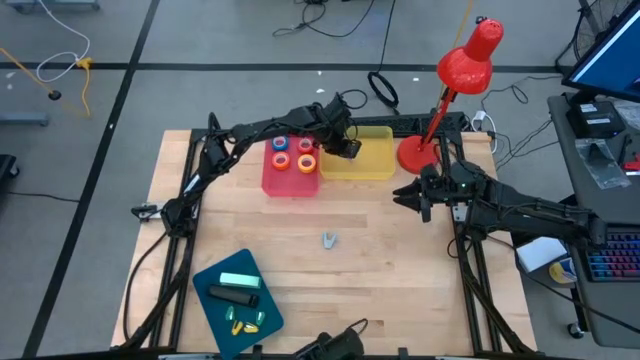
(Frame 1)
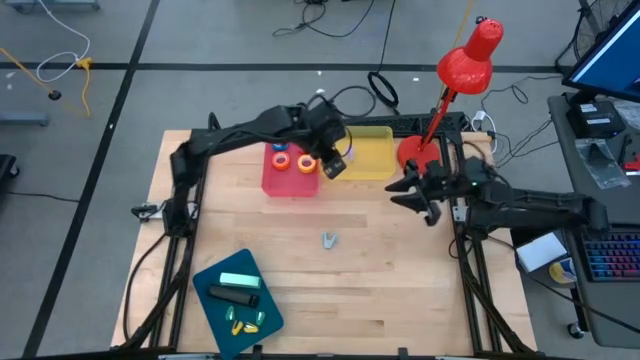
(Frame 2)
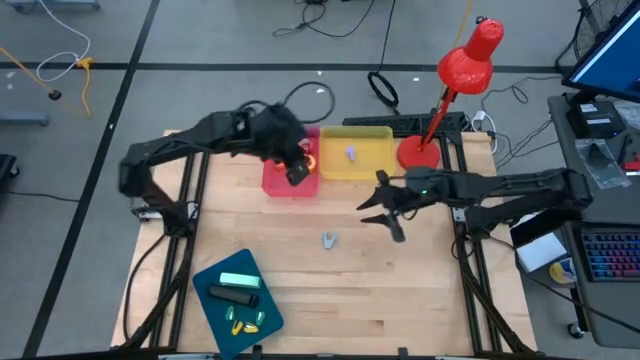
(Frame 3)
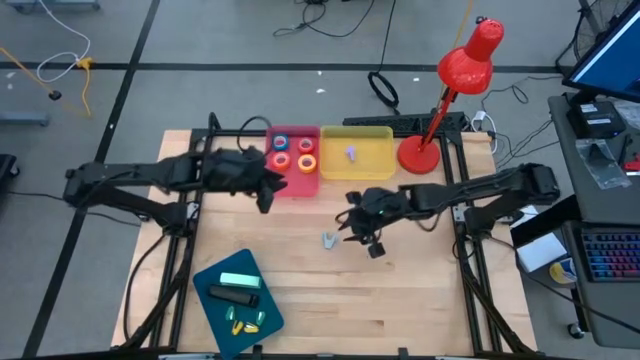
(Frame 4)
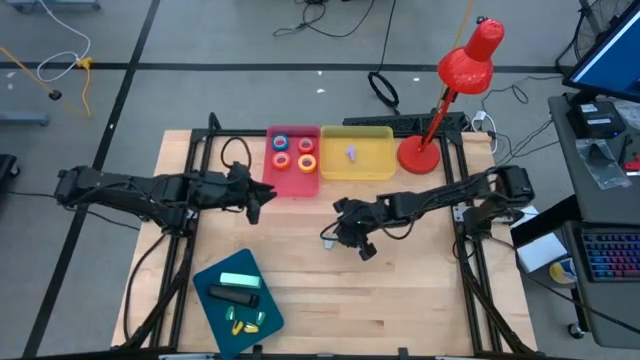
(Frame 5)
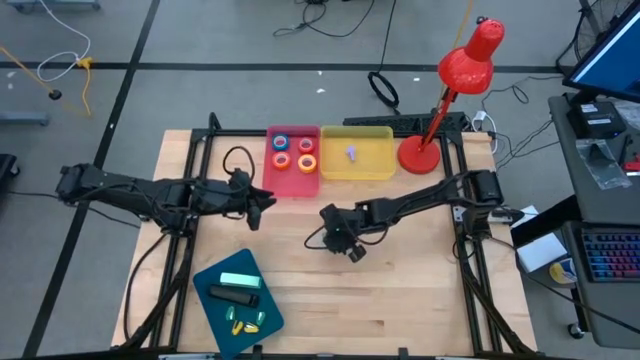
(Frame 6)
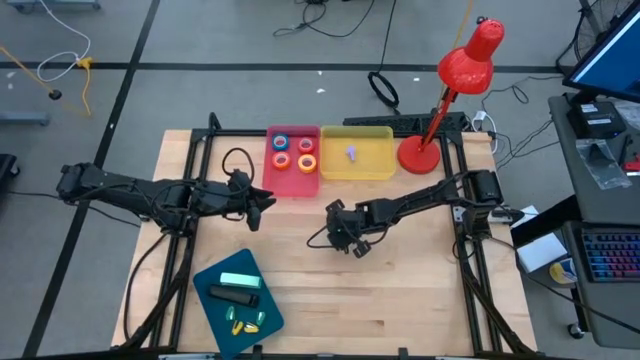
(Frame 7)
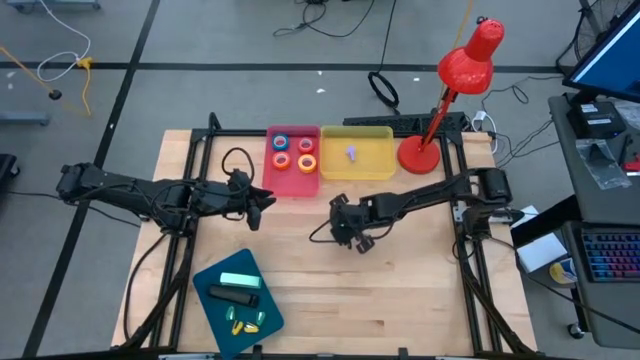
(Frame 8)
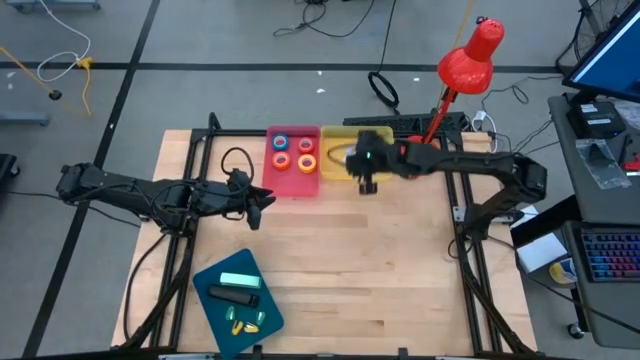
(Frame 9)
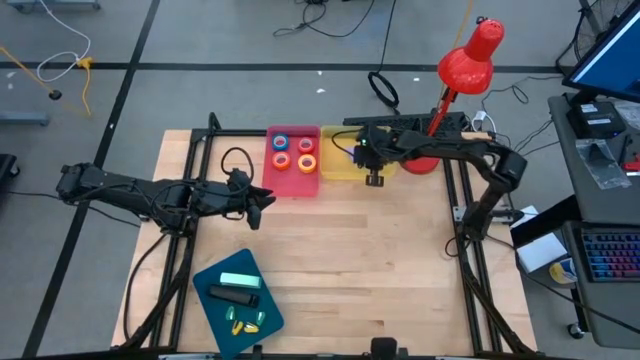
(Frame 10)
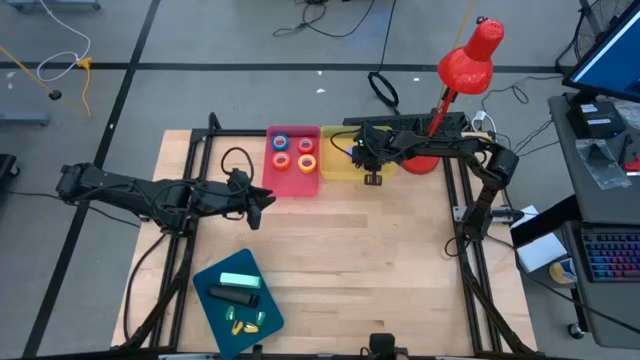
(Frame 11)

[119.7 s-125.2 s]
Task: Pick and place Stapler, Stapler remover, tape
Put the light blue staple remover into the yellow bin

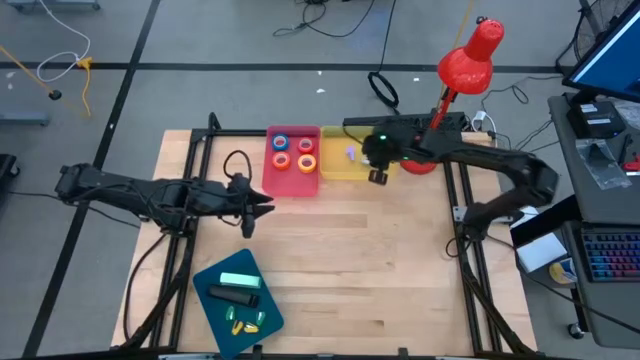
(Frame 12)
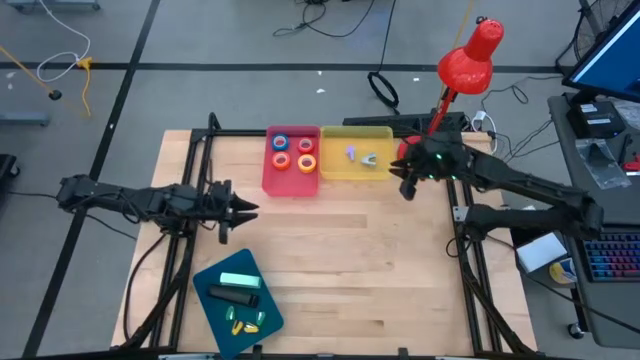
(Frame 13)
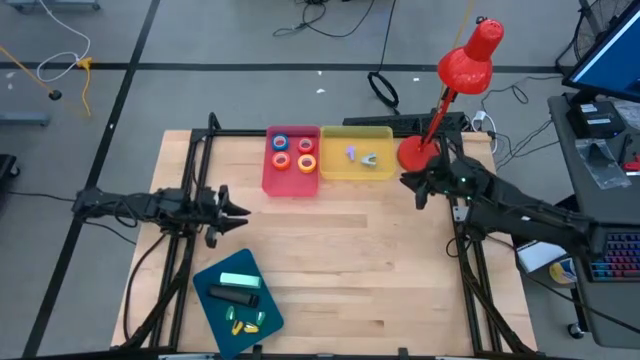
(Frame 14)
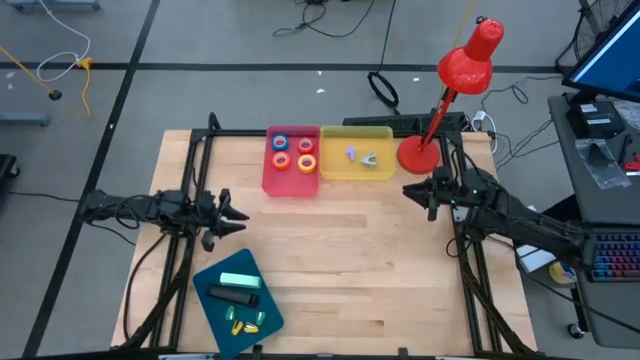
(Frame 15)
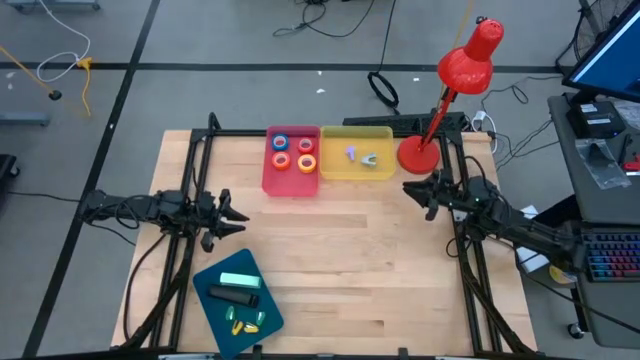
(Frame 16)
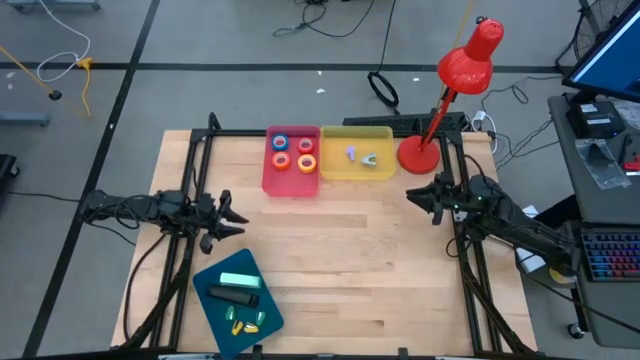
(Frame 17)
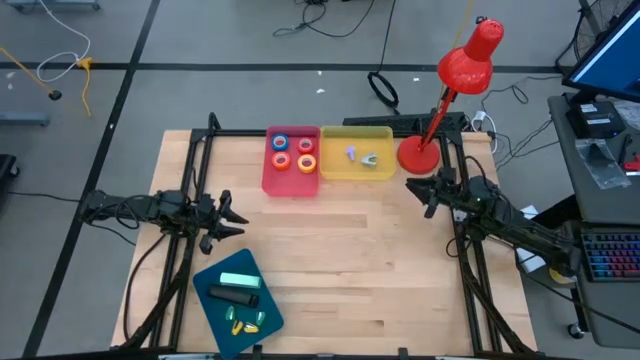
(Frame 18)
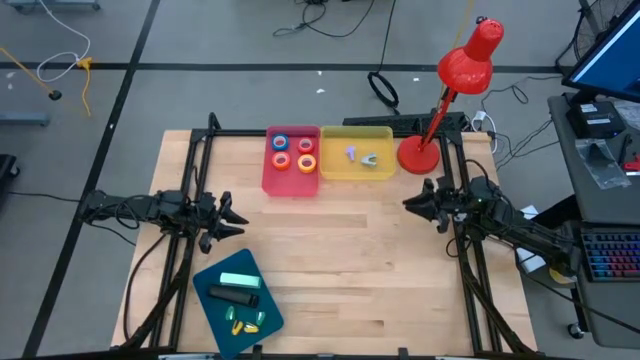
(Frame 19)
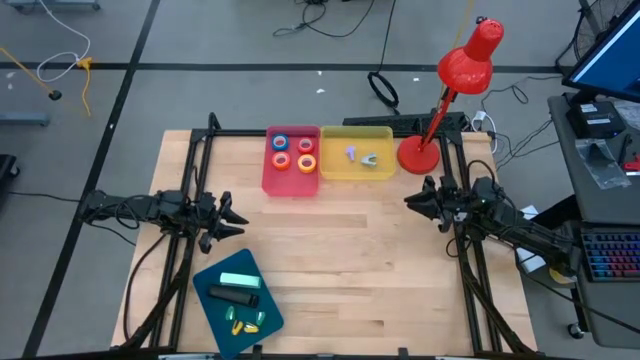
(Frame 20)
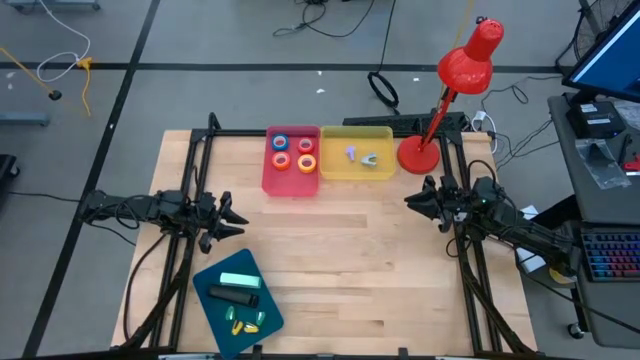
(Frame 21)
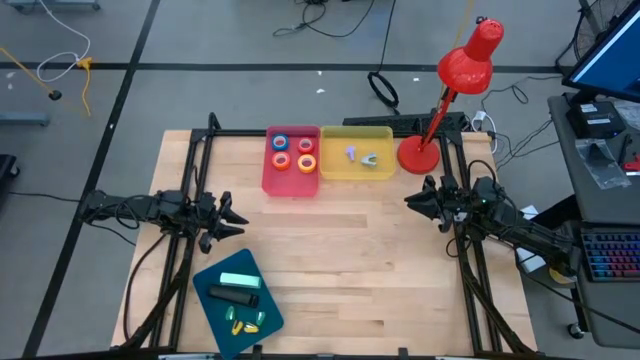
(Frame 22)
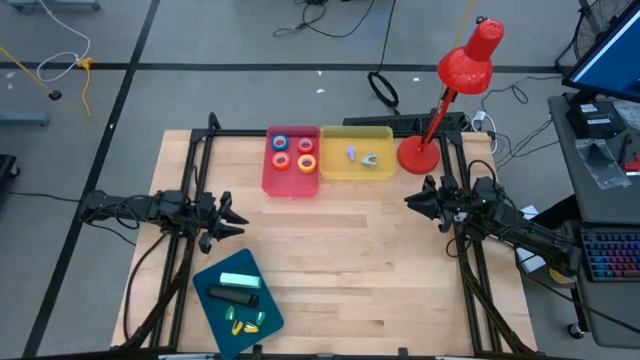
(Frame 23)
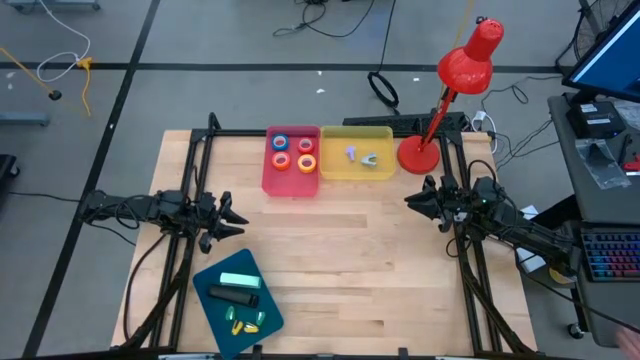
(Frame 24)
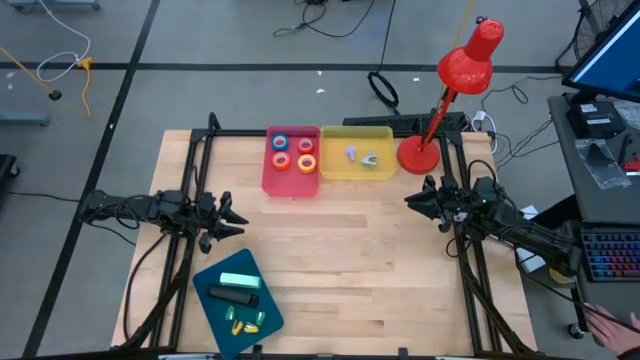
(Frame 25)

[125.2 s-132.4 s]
Return to Home Position
